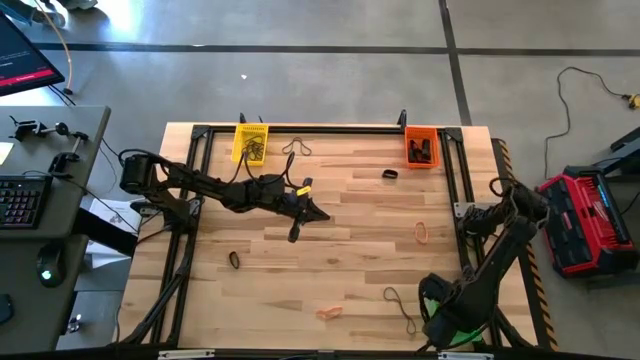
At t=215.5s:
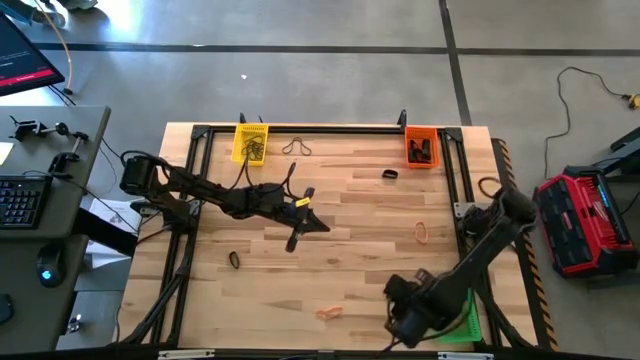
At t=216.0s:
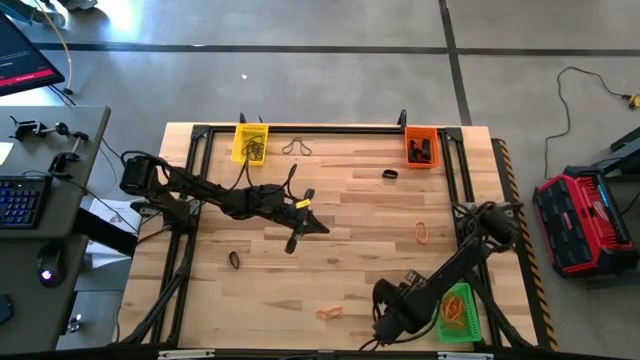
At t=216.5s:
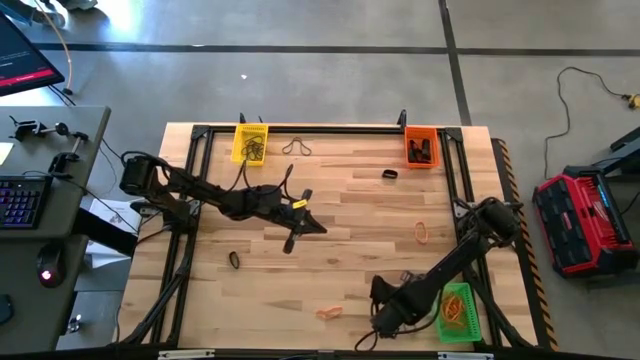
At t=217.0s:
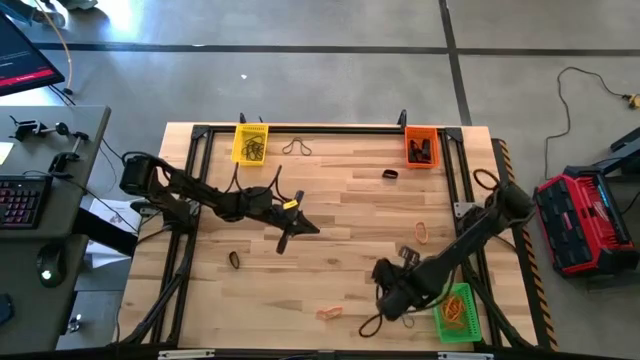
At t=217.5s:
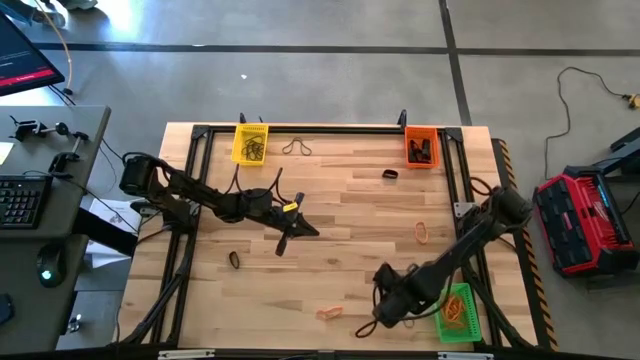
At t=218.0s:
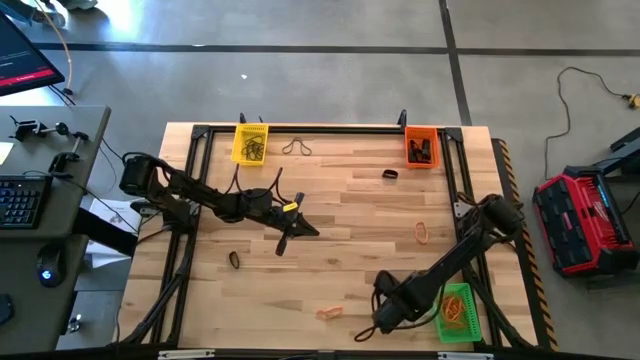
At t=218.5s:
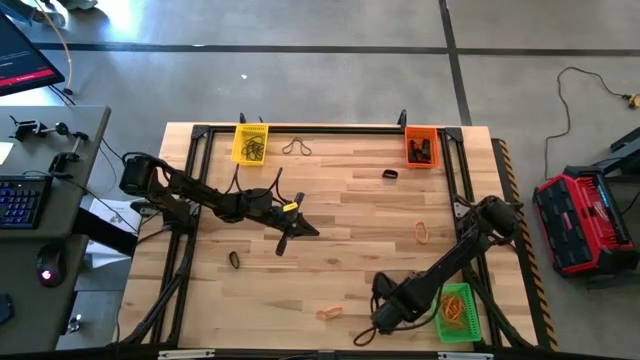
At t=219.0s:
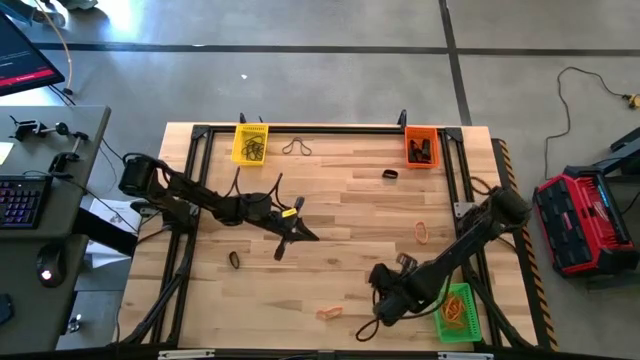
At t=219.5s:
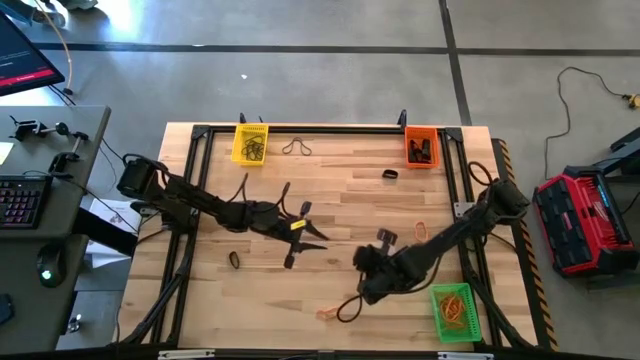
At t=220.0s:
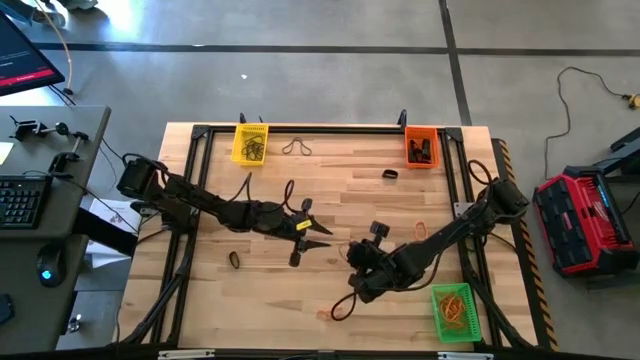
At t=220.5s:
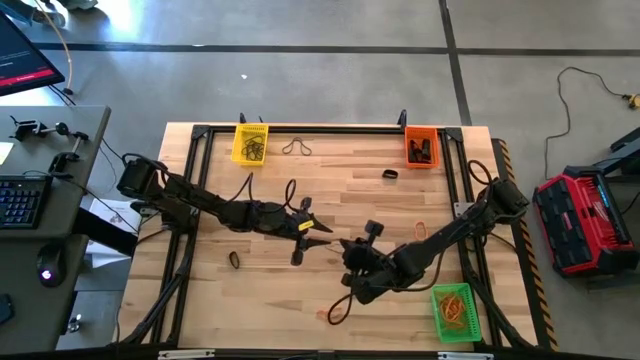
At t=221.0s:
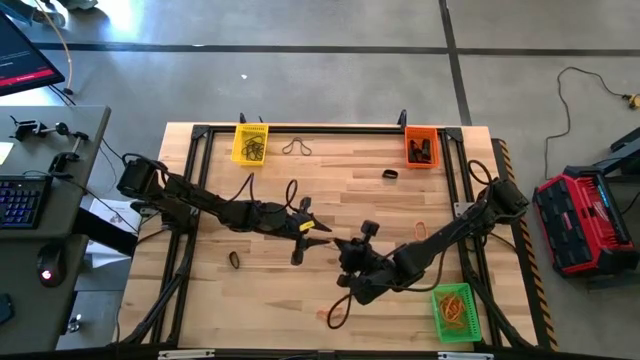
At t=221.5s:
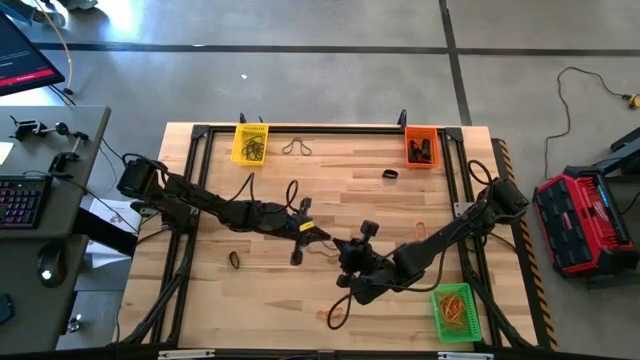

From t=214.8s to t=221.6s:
Task: Sort rubber bands into baskets
Put the purple rubber band into the yellow bin

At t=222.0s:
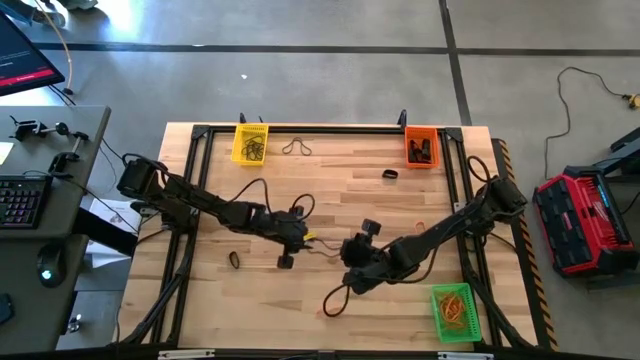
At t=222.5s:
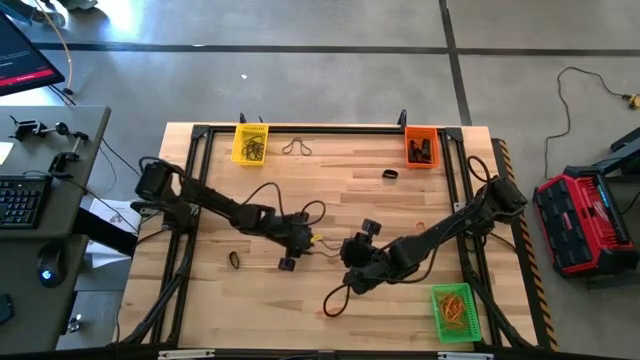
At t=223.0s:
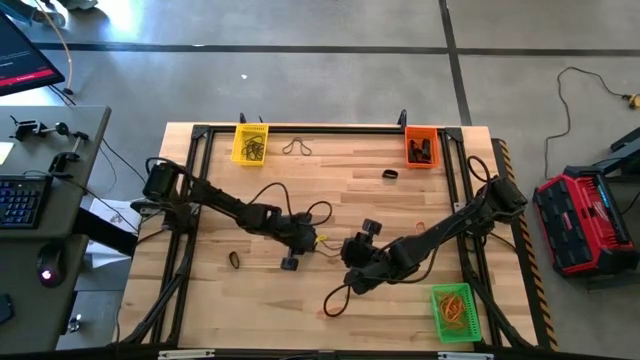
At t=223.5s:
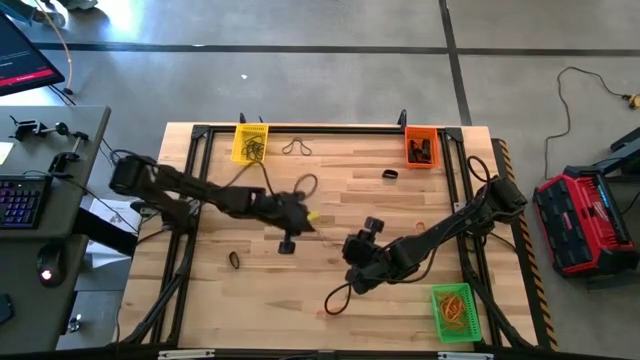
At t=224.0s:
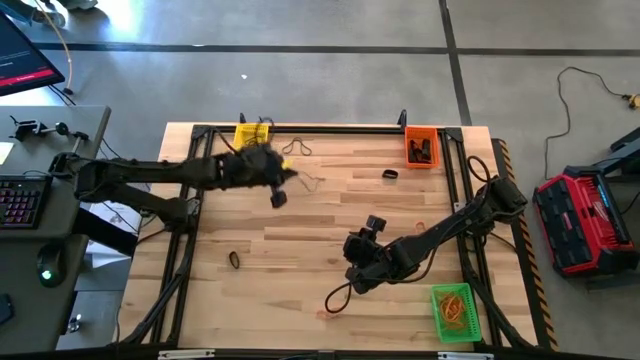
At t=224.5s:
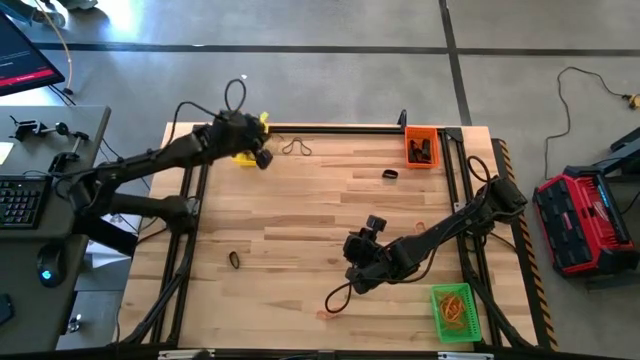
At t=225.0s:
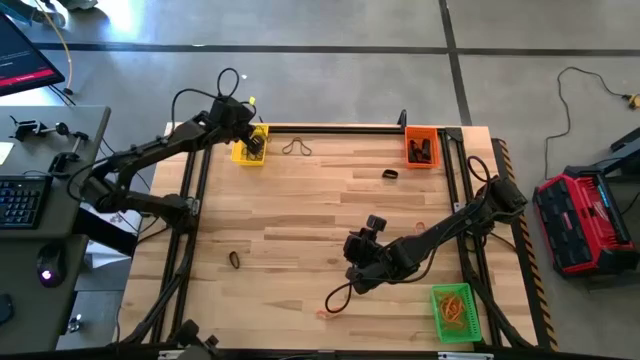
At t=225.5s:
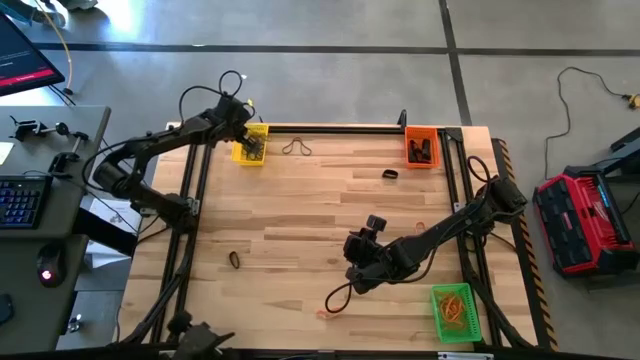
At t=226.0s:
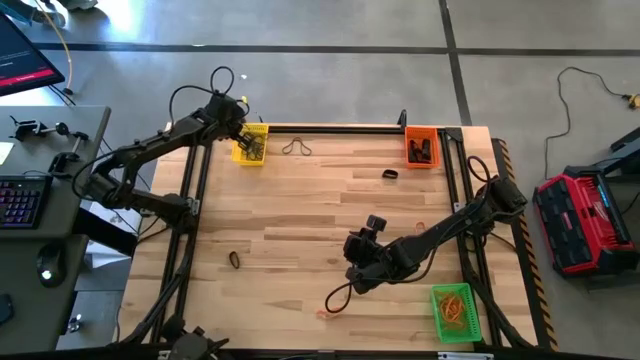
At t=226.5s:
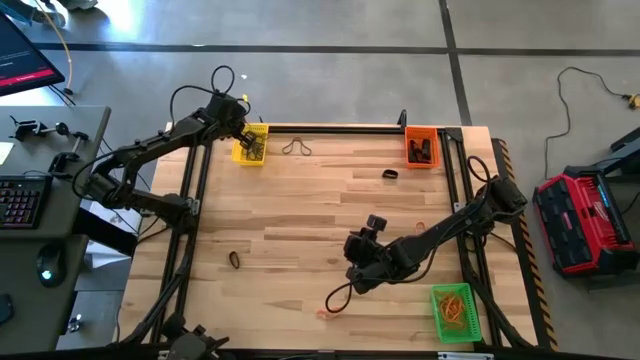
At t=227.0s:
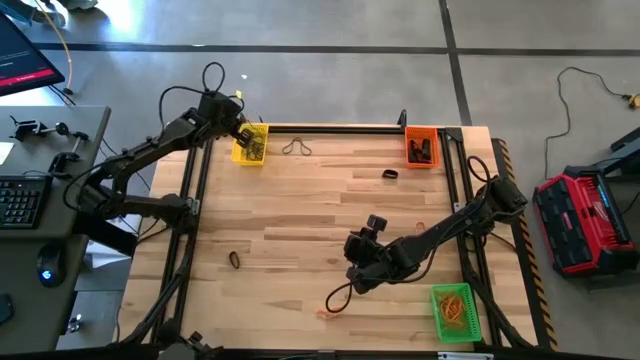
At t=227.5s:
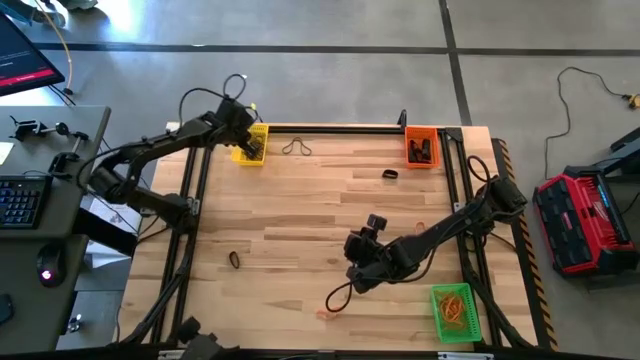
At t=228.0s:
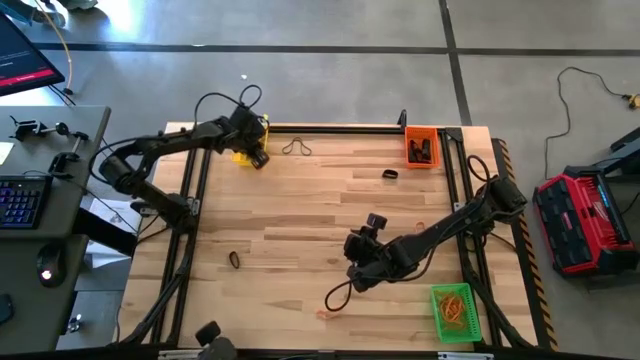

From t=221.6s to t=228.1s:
Put the purple rubber band into the yellow bin

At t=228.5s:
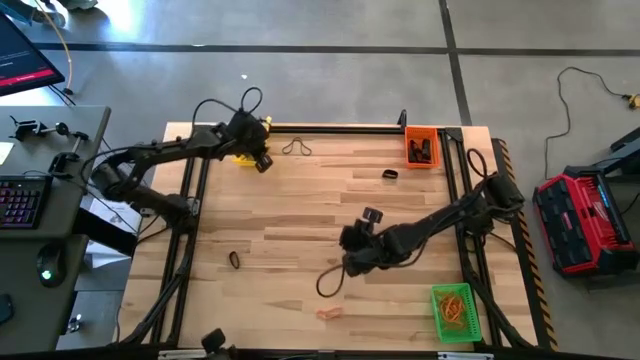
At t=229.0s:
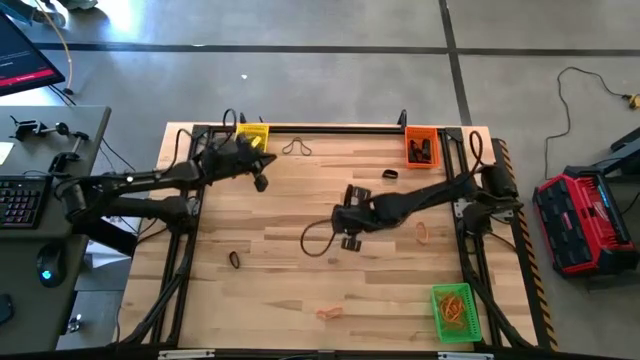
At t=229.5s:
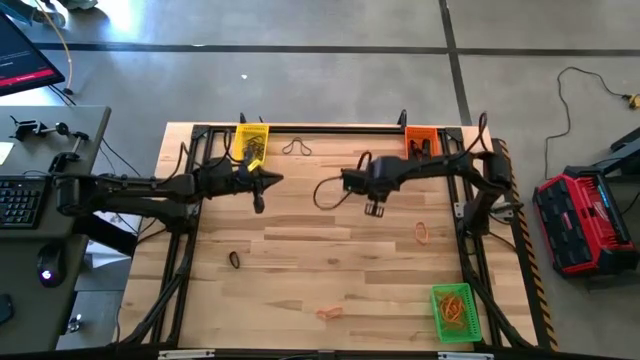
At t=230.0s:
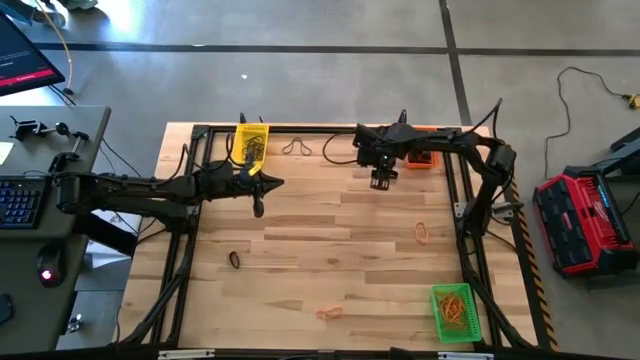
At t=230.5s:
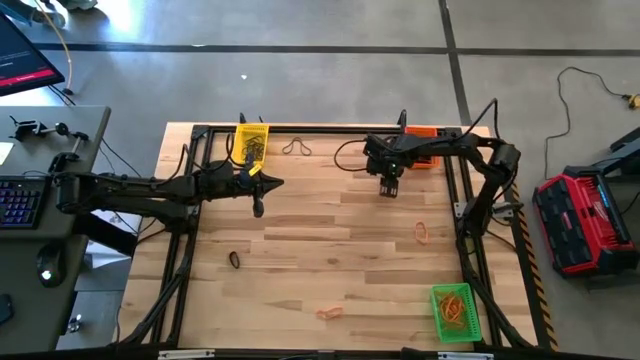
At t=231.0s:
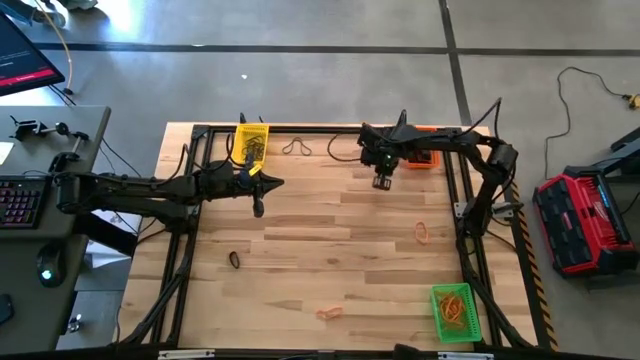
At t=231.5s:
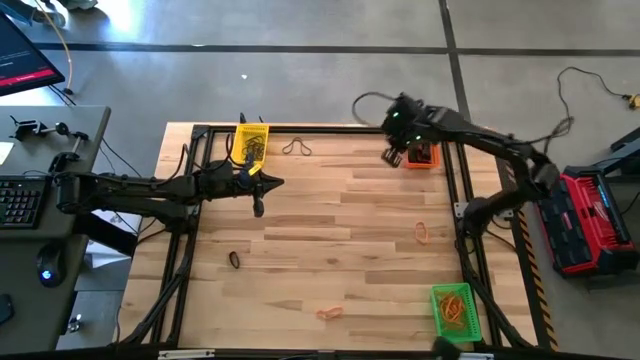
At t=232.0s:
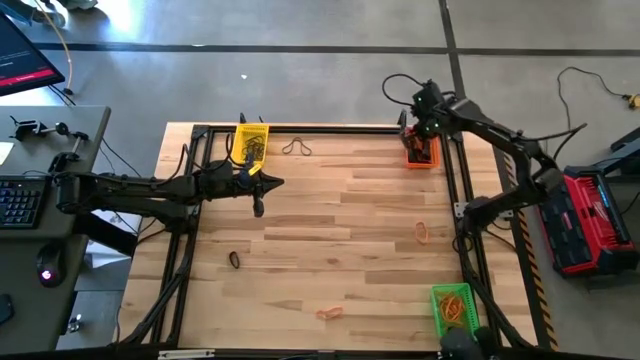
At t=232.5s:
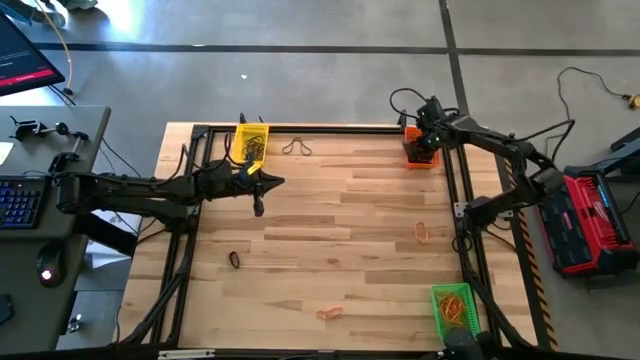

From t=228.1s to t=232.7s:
Put the black rubber band into the orange bin

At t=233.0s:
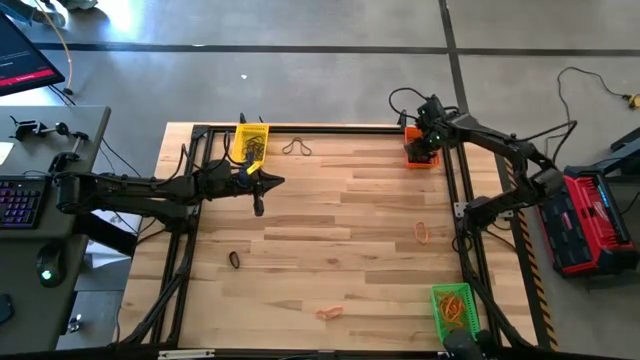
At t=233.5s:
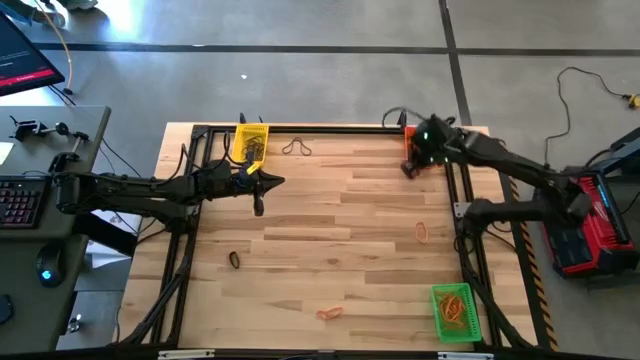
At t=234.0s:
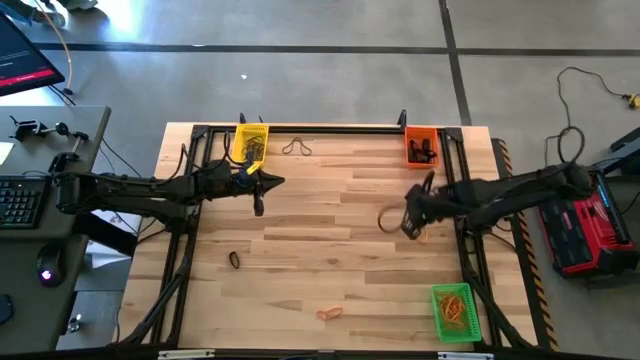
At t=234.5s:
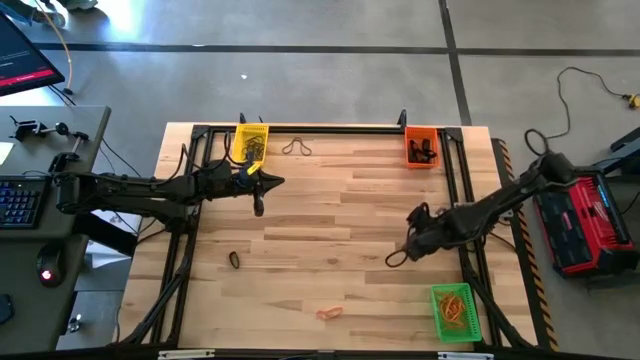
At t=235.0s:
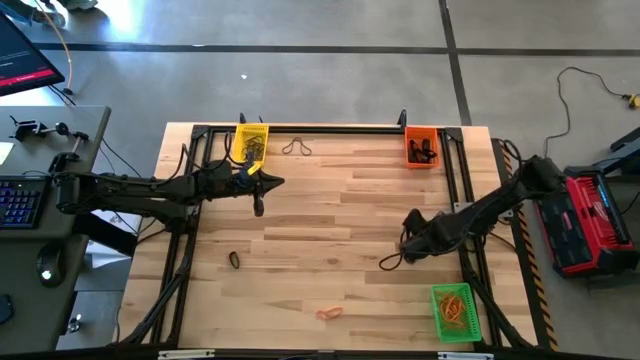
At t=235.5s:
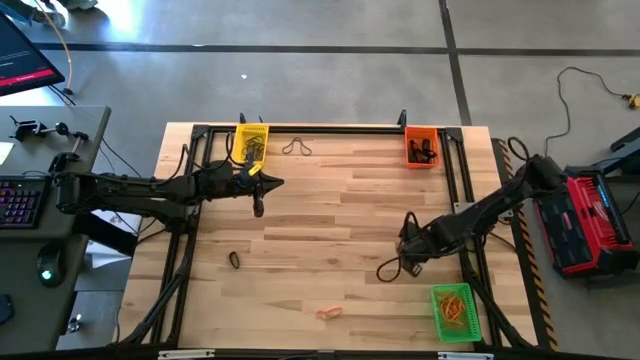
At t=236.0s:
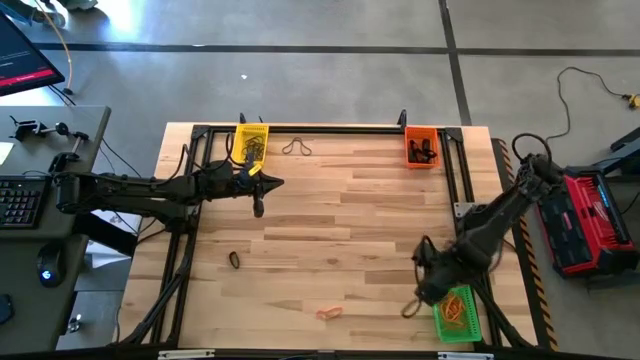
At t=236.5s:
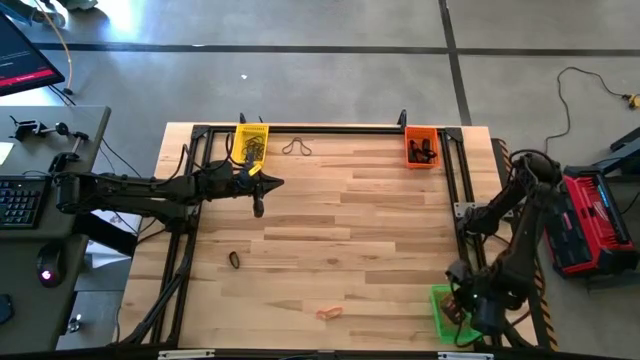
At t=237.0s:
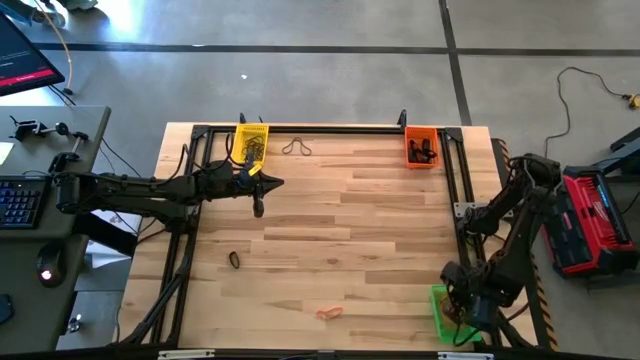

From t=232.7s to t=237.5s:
Put the orange rubber band into the green bin
